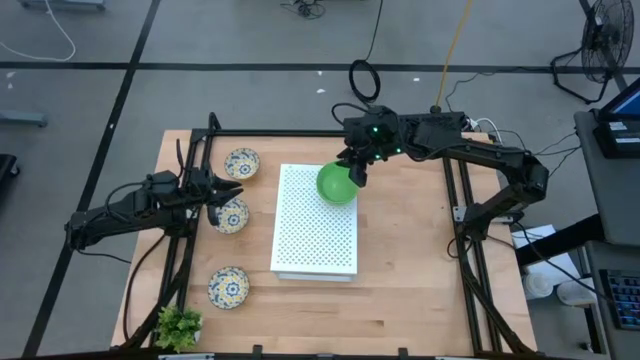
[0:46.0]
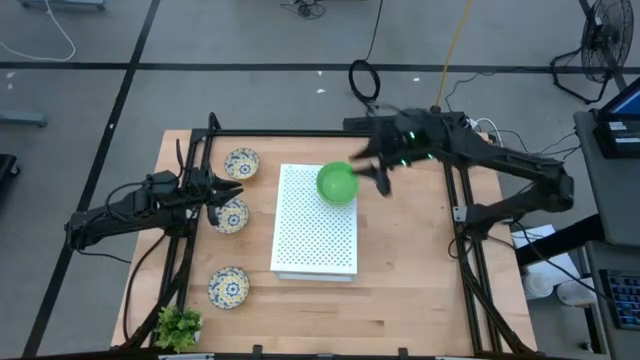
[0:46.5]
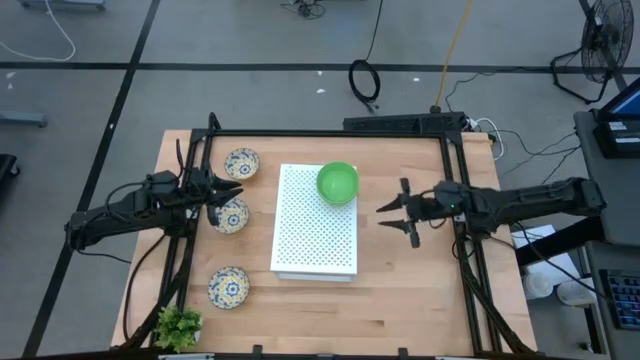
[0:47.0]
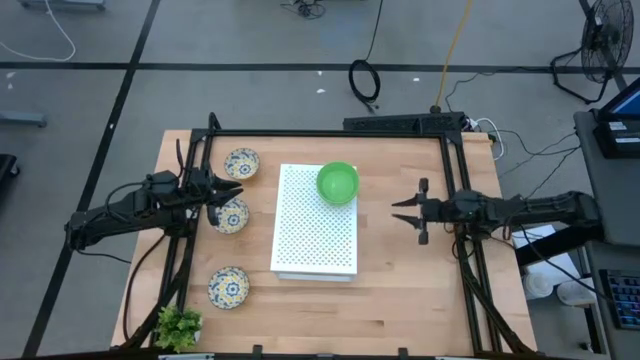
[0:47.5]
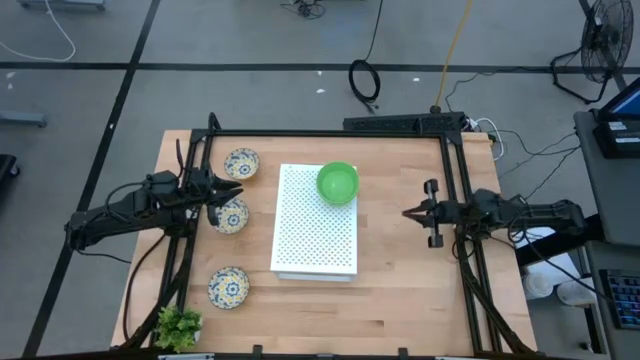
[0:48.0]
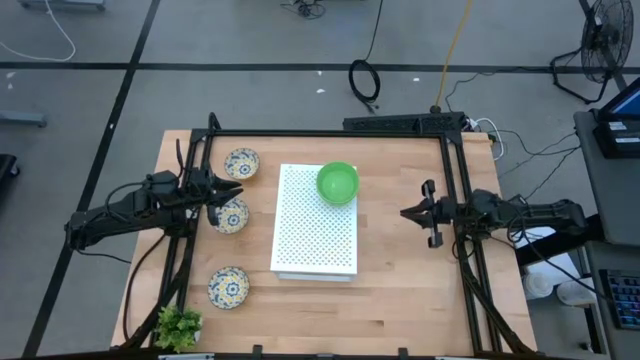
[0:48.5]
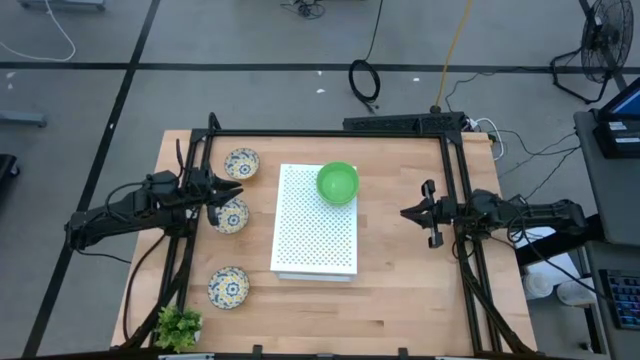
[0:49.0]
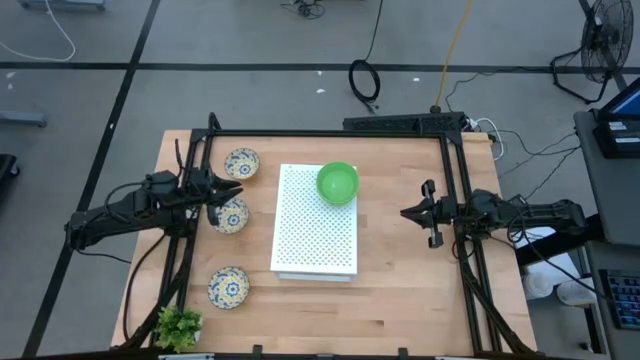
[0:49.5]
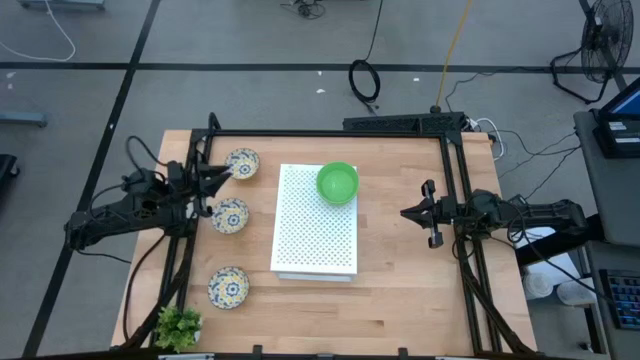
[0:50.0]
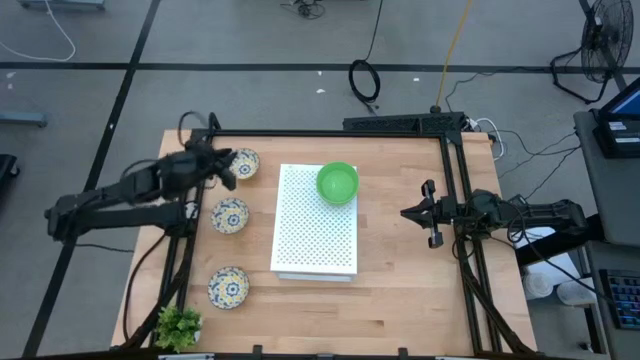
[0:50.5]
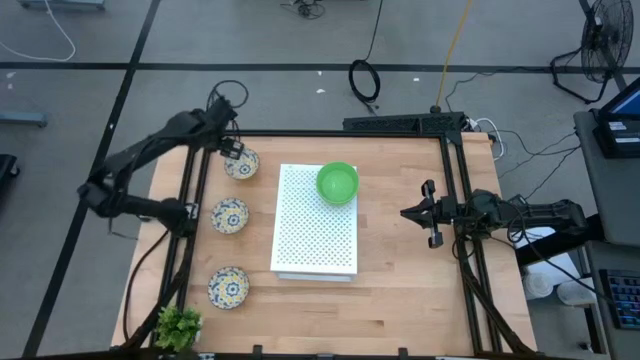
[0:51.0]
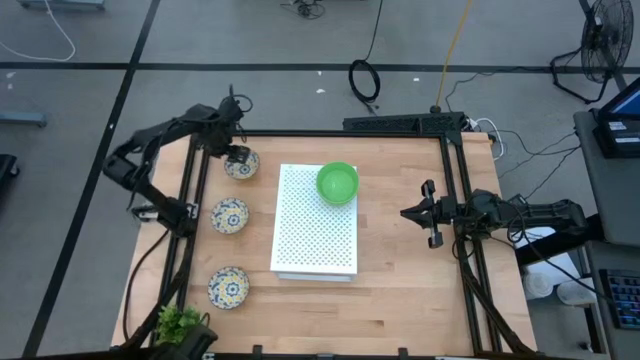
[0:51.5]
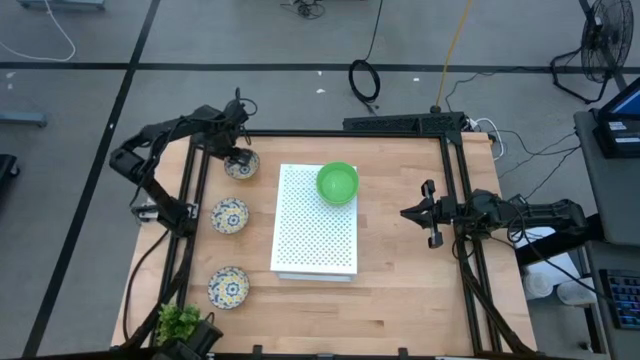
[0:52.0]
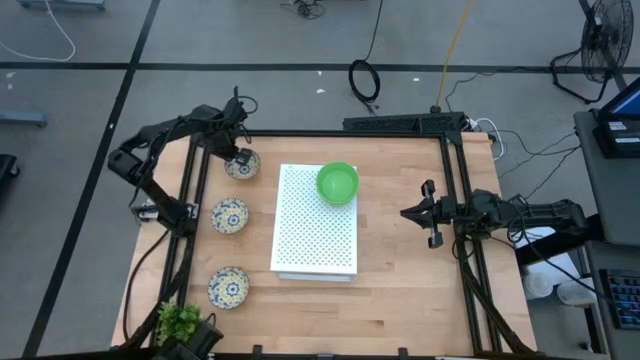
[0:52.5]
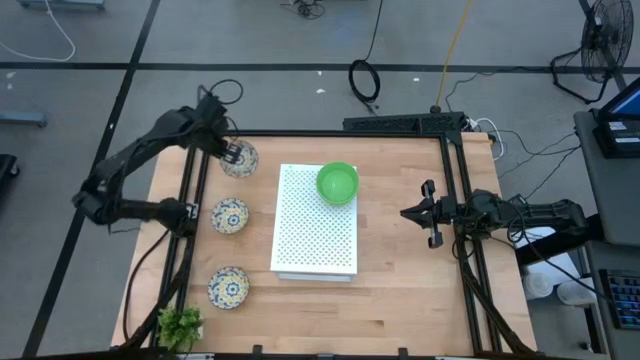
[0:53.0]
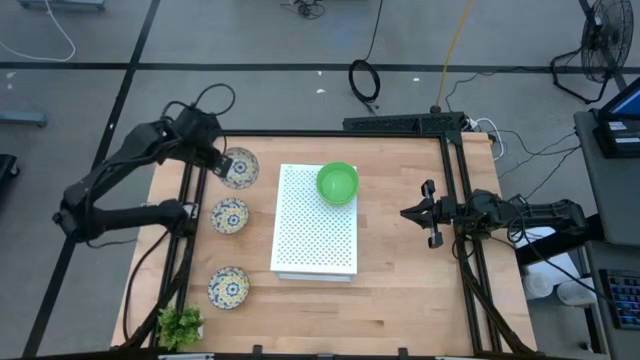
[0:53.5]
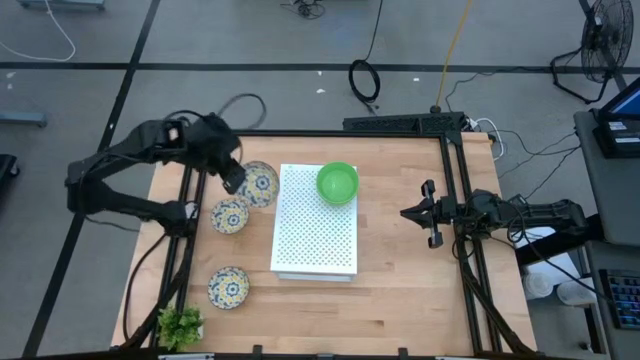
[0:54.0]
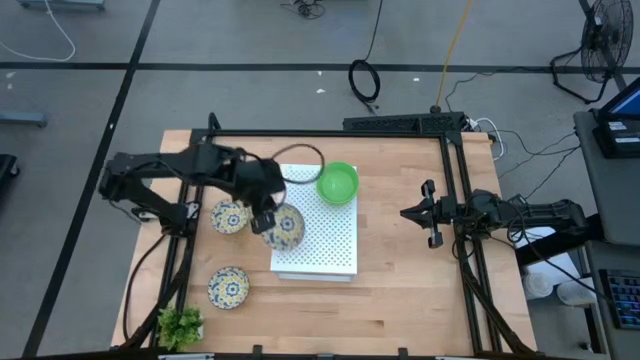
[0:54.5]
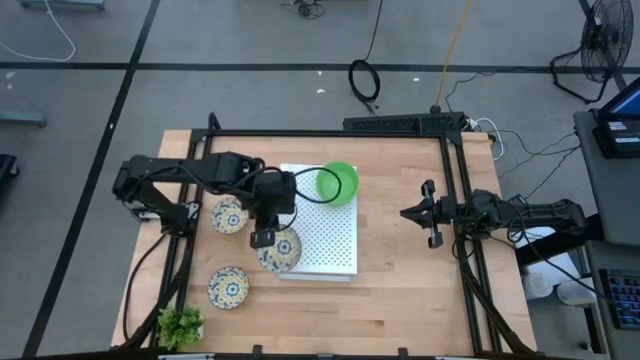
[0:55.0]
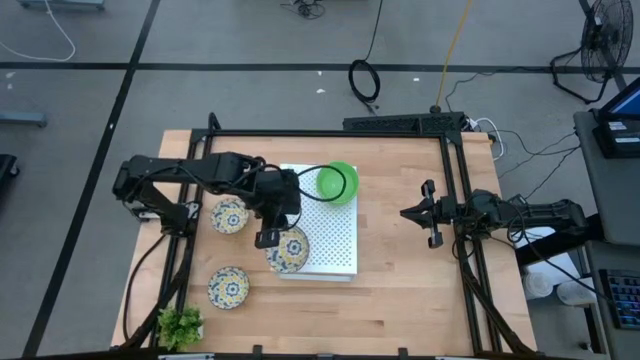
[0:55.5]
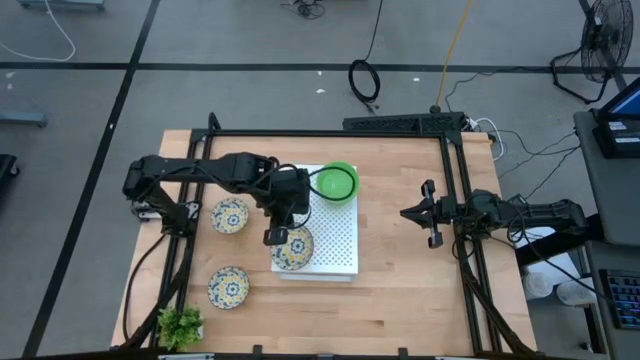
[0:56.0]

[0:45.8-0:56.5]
Task: Pick & Place Mini bowls
Put the top yellow patterned bowl on the shelf

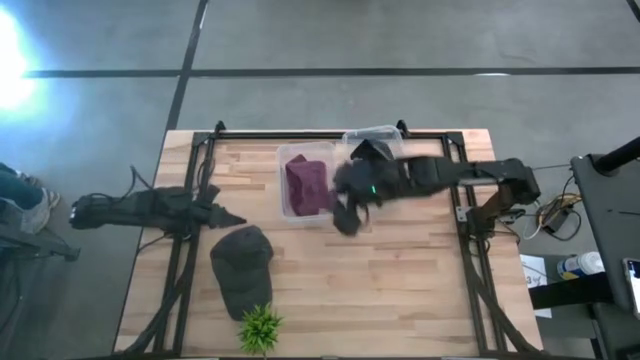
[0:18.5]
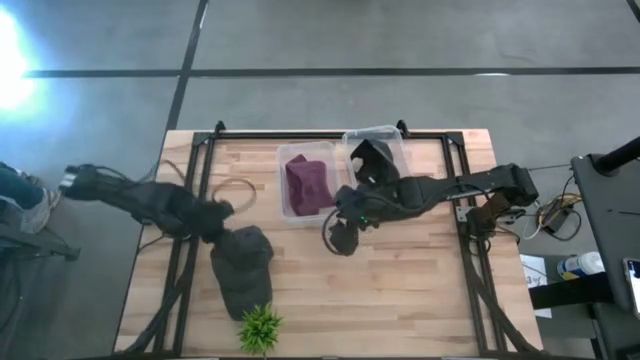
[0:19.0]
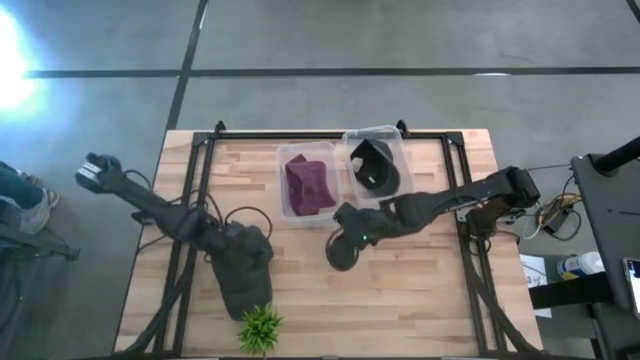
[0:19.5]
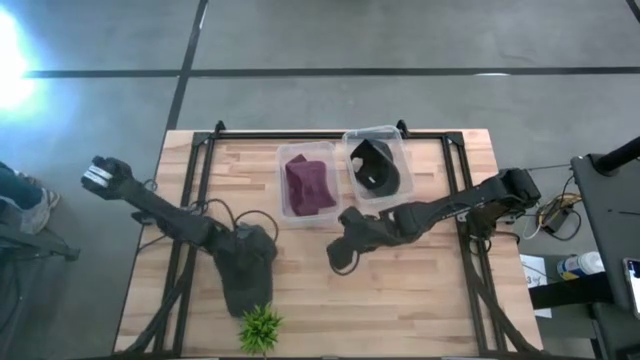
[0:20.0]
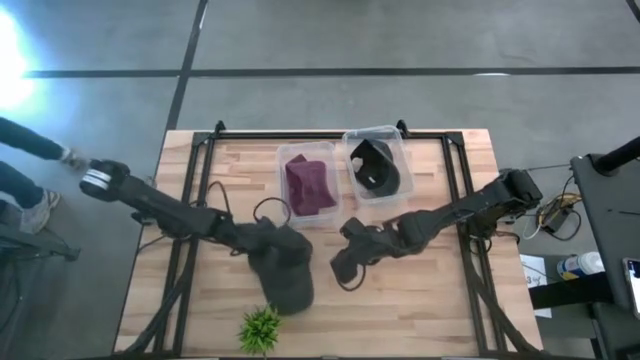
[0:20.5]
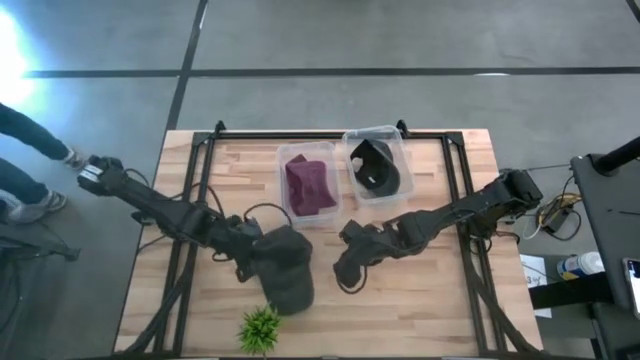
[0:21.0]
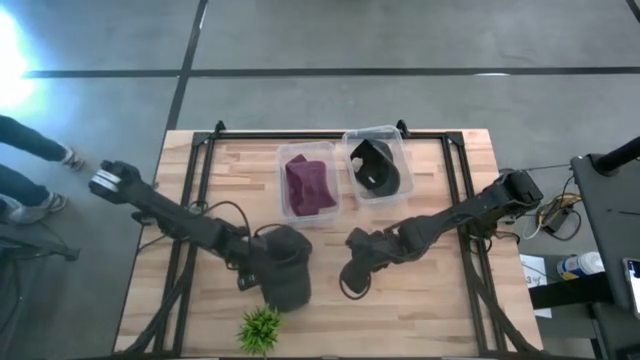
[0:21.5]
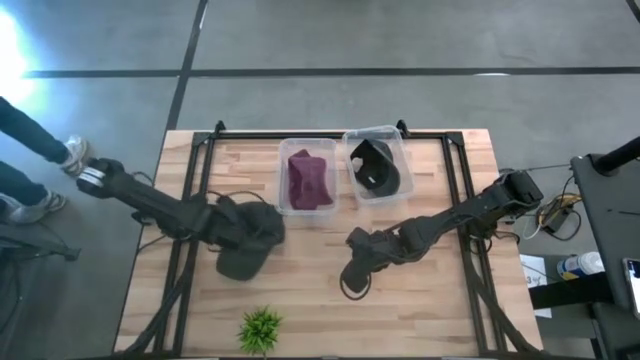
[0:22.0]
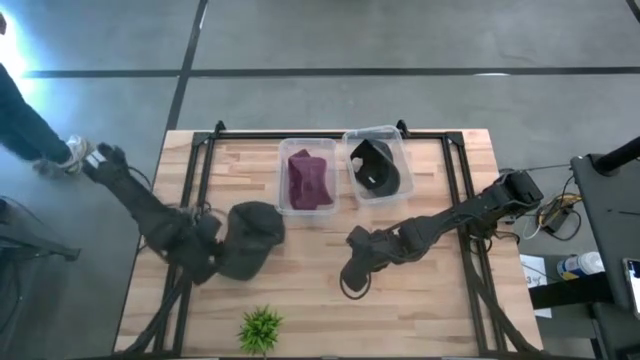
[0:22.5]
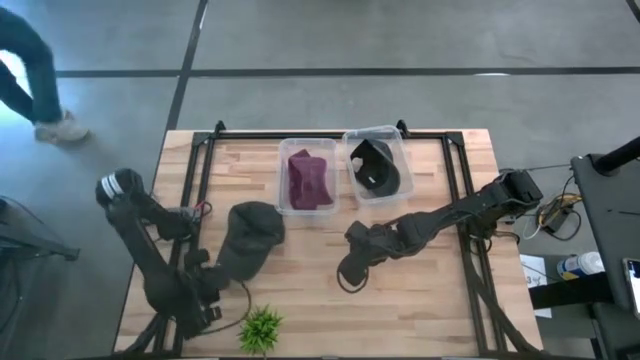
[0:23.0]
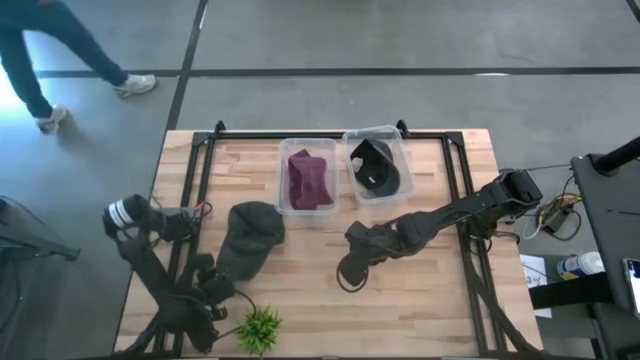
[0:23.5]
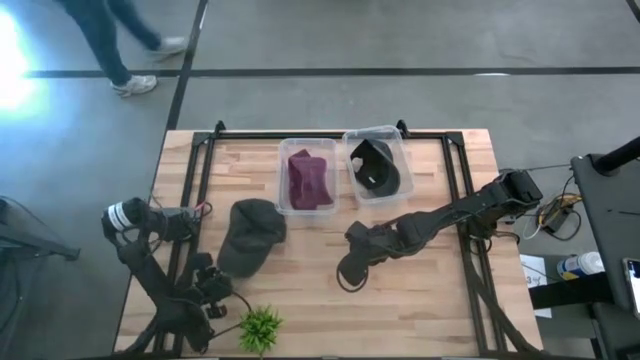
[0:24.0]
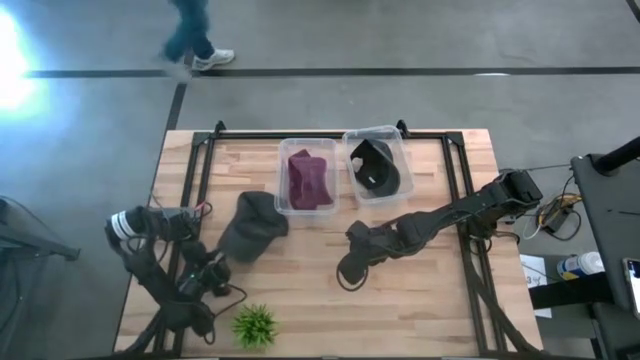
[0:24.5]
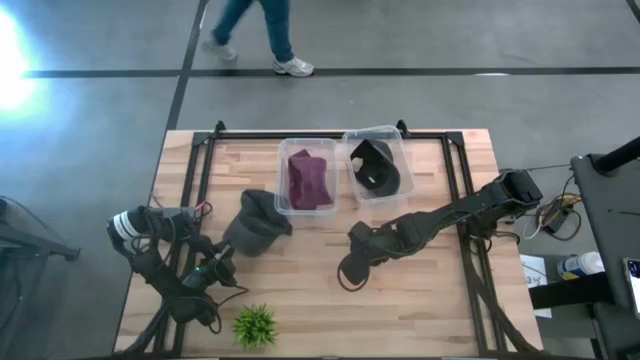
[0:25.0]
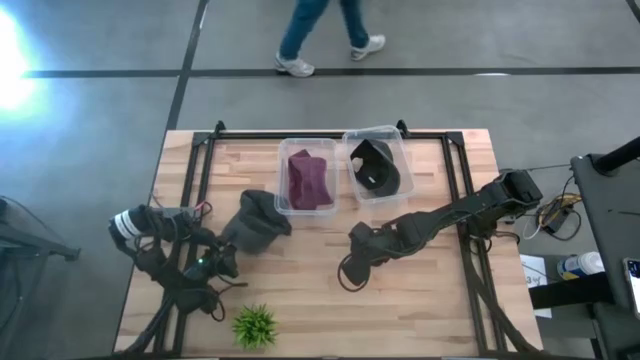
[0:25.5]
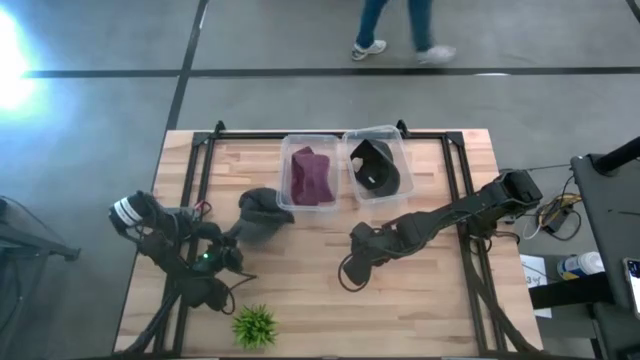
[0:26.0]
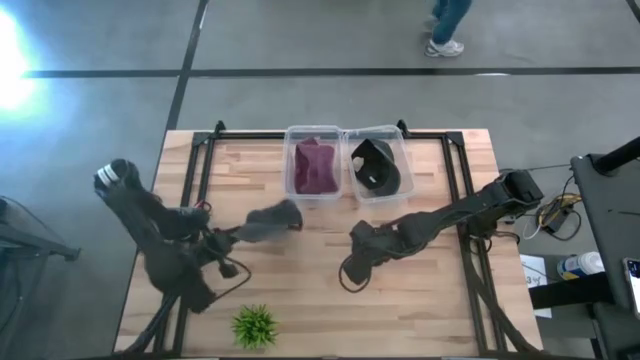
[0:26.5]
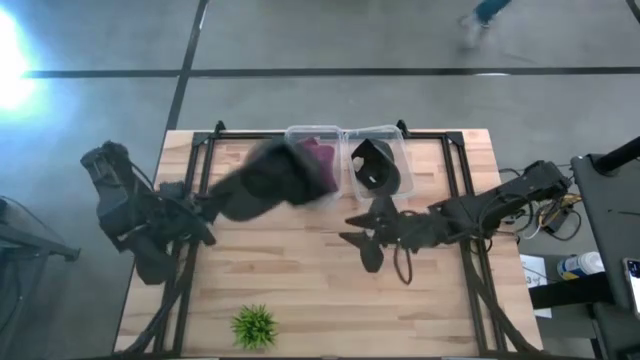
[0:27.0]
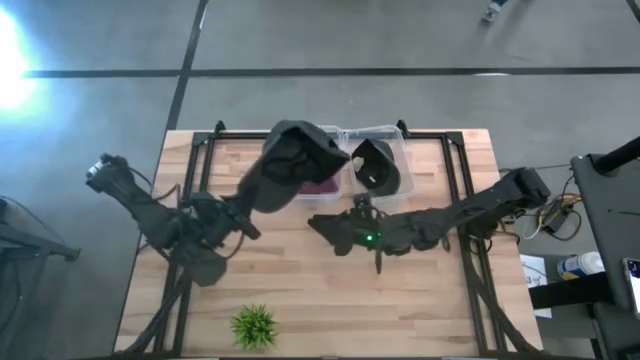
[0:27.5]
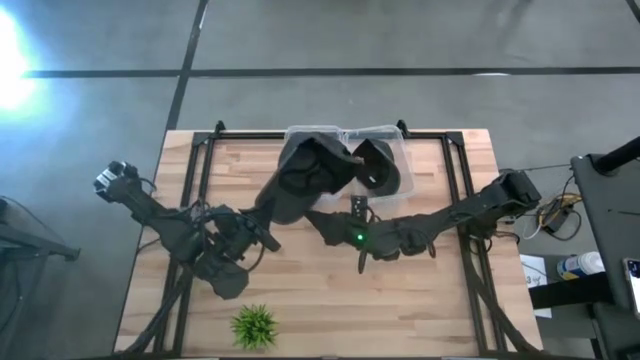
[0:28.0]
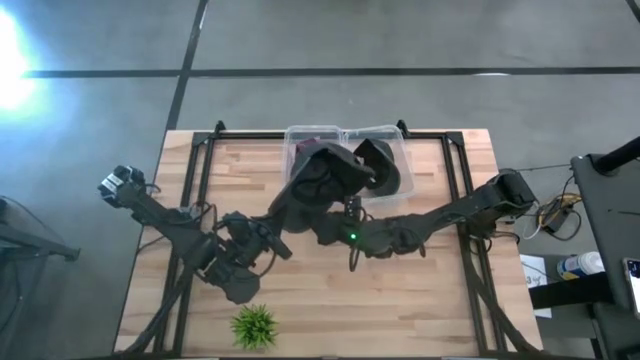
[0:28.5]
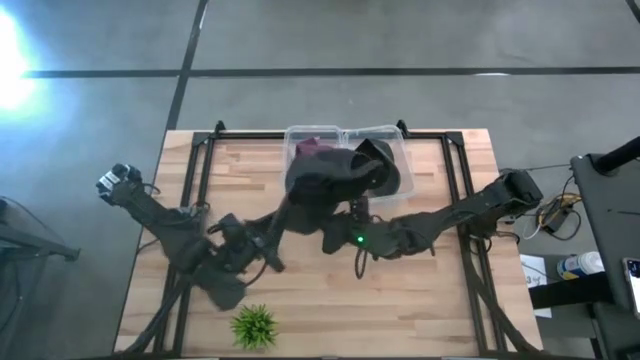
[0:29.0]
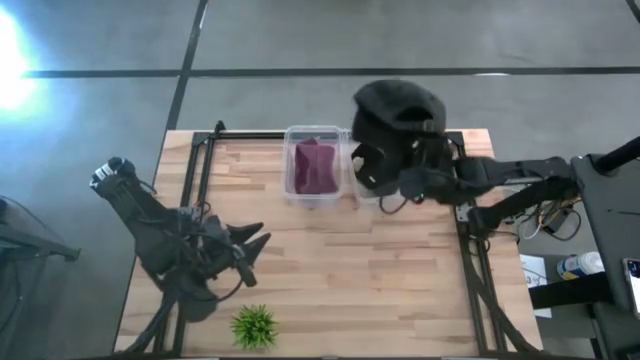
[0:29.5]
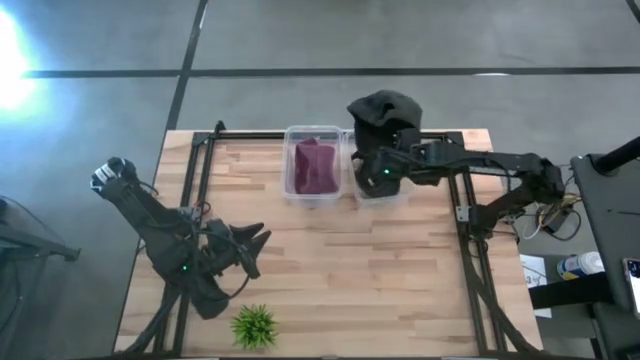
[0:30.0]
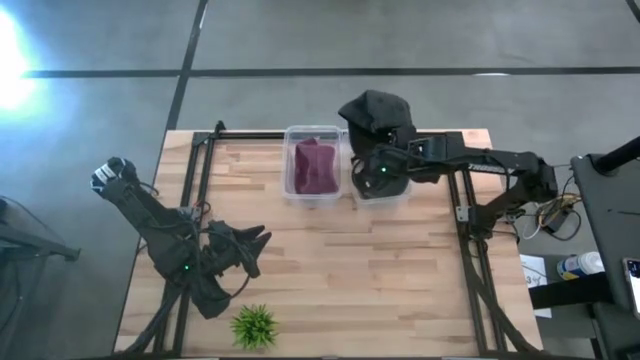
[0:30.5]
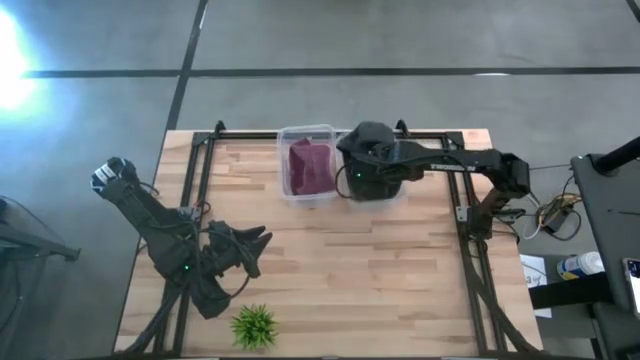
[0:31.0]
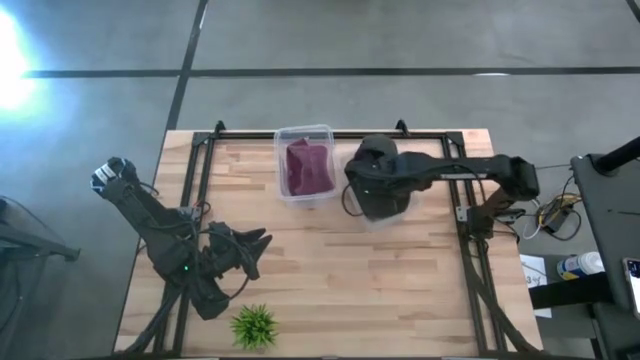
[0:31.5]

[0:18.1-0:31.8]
Task: Pick and place caps into container
Put the black cap into the right transparent container
